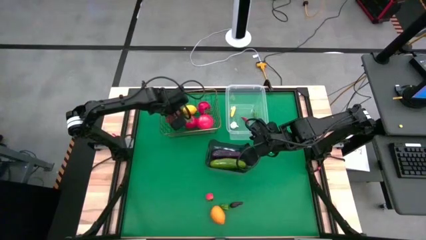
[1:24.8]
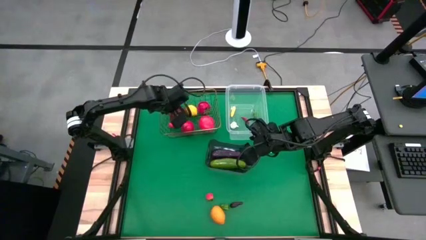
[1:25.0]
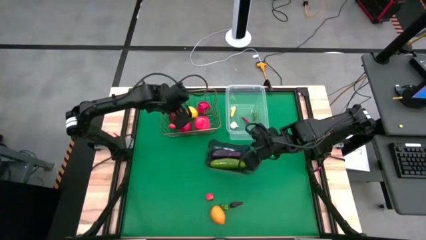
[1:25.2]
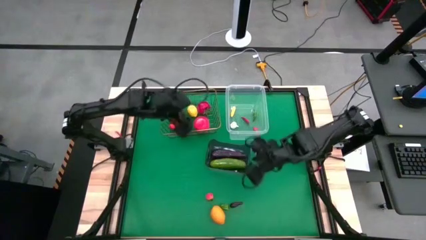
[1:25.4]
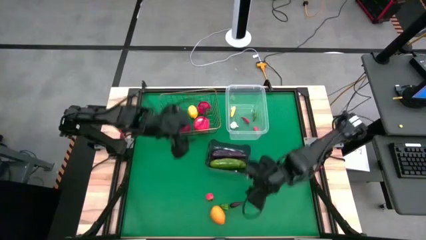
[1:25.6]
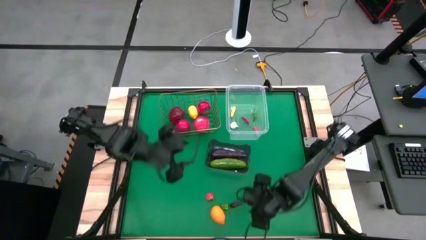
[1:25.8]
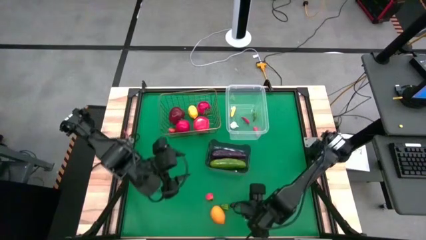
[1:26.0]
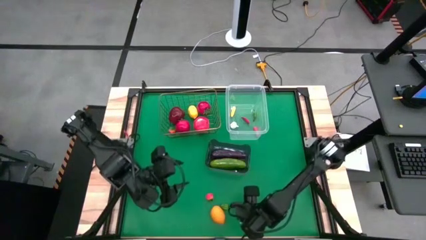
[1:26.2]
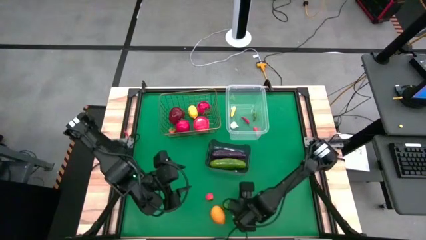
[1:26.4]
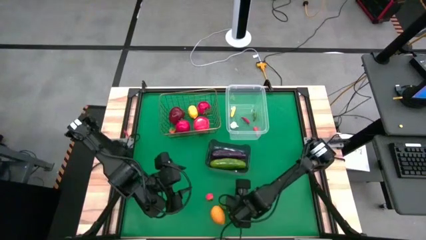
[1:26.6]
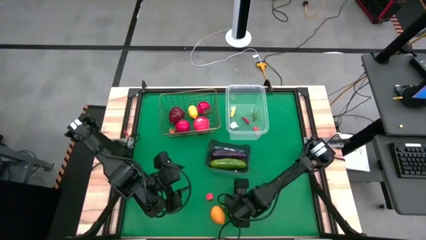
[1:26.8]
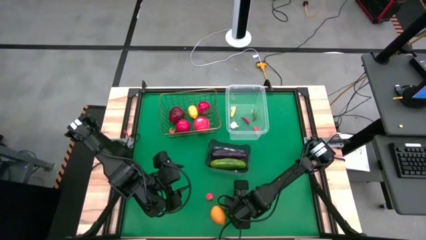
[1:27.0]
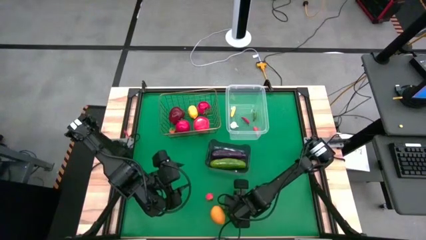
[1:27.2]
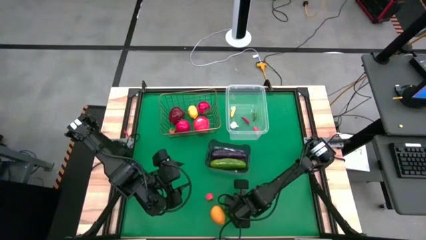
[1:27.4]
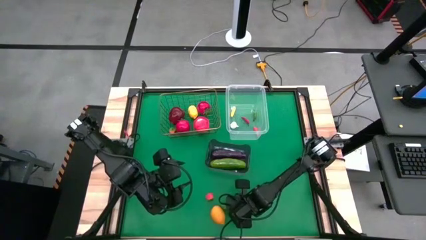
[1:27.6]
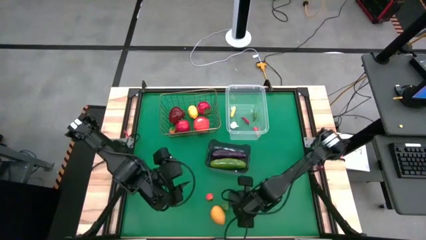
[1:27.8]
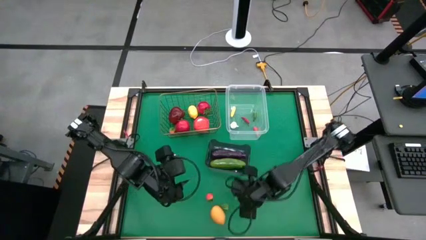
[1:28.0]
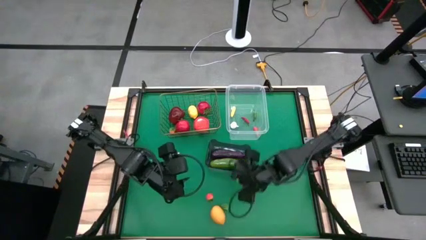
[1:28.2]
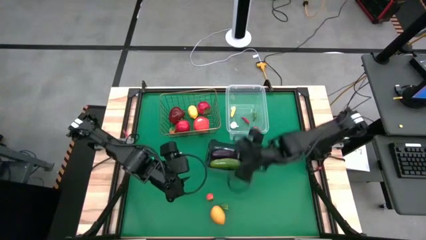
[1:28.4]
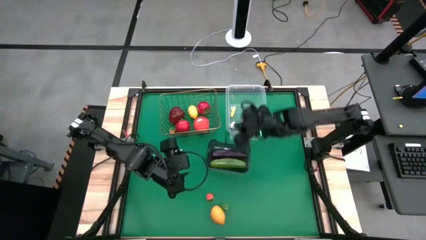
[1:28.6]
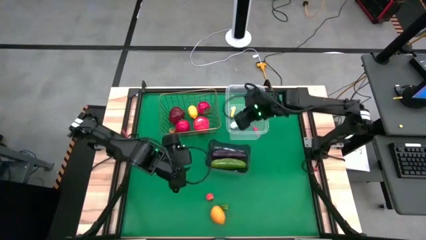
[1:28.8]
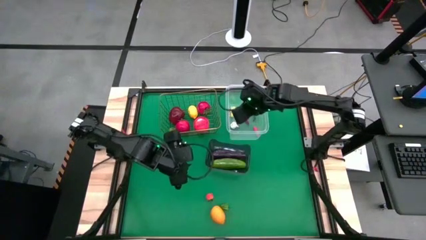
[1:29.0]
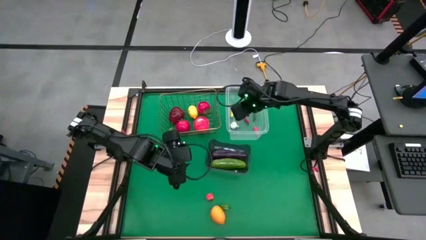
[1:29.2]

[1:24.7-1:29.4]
Task: Sort produce into baskets
Put the eggplant into the transparent bin

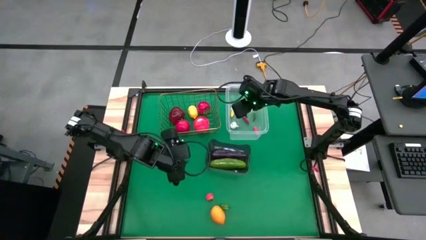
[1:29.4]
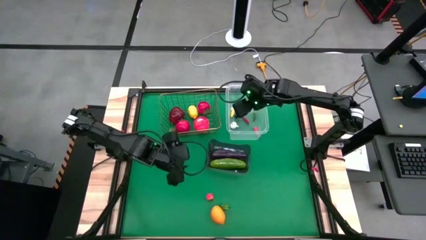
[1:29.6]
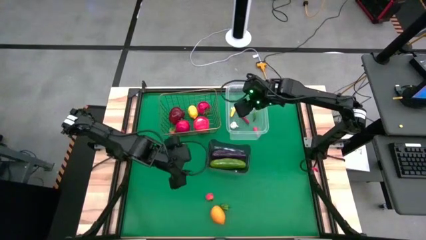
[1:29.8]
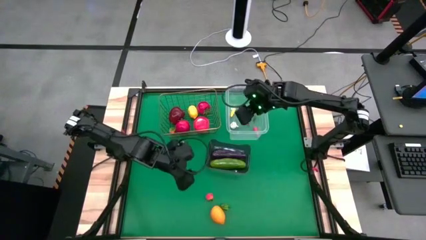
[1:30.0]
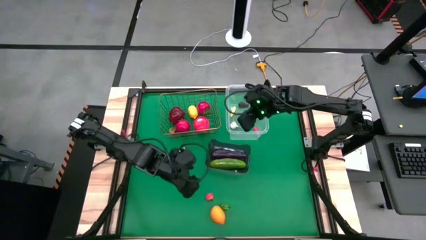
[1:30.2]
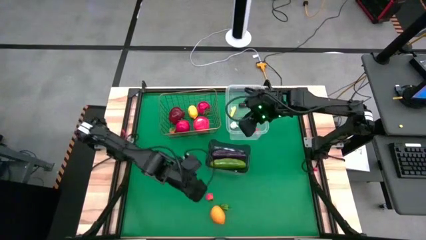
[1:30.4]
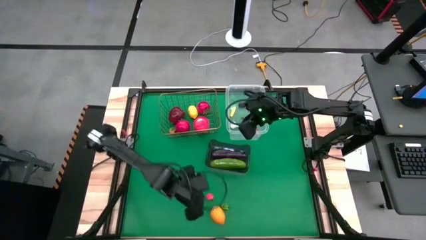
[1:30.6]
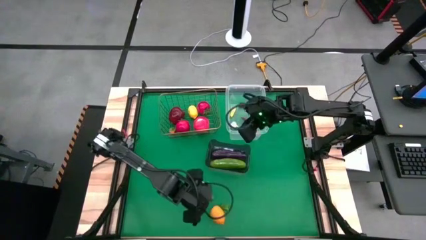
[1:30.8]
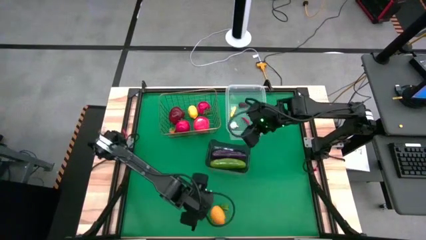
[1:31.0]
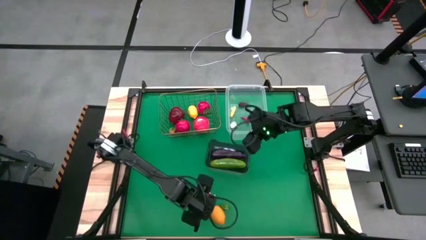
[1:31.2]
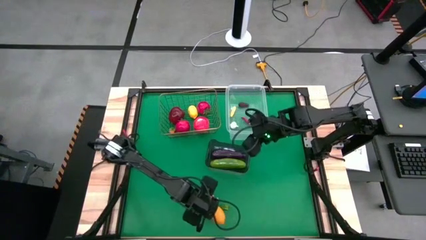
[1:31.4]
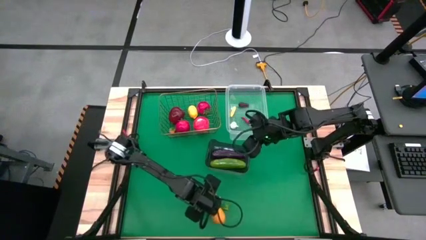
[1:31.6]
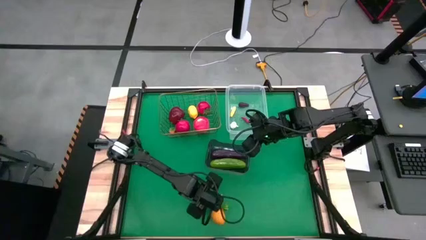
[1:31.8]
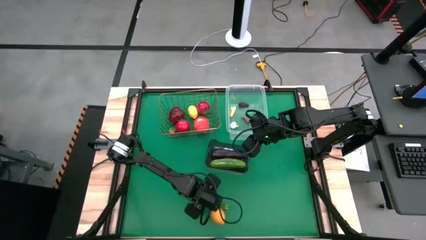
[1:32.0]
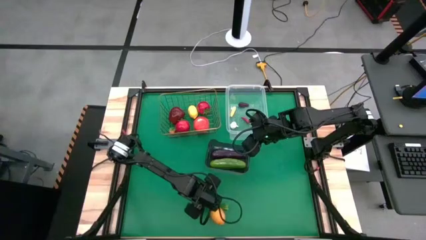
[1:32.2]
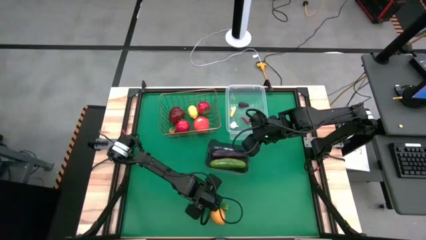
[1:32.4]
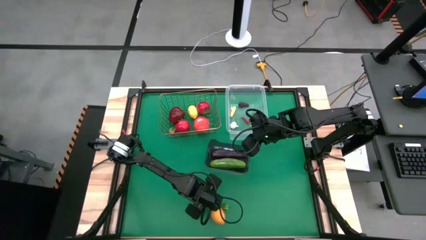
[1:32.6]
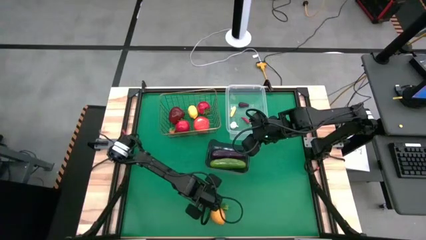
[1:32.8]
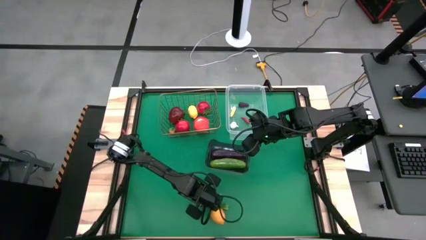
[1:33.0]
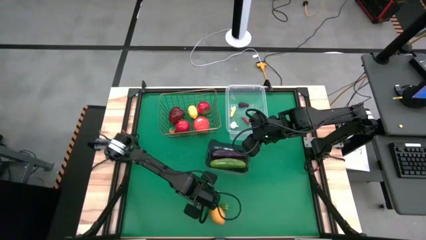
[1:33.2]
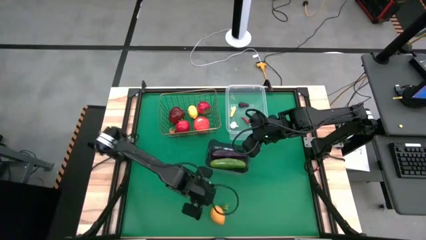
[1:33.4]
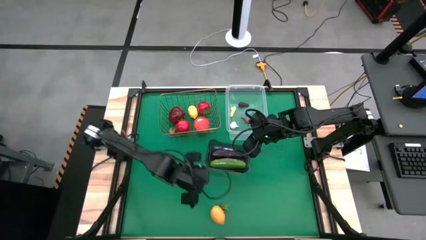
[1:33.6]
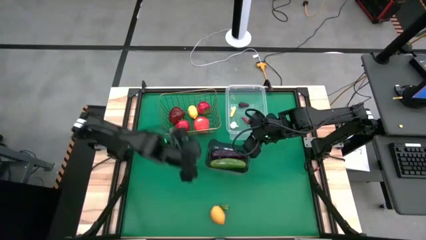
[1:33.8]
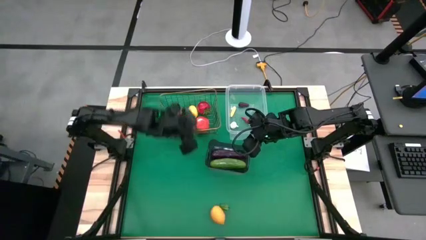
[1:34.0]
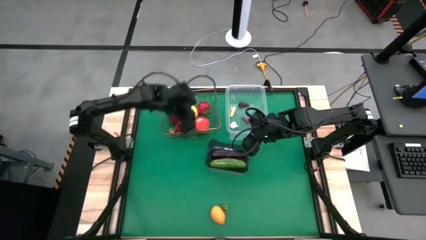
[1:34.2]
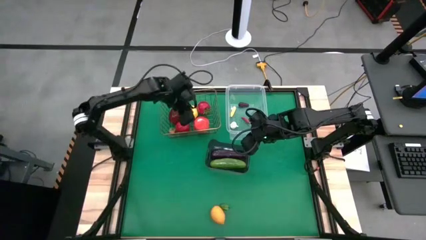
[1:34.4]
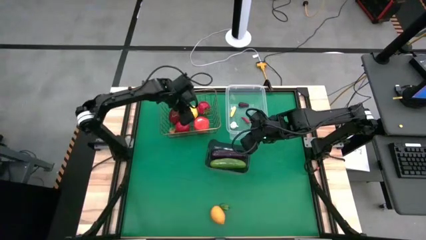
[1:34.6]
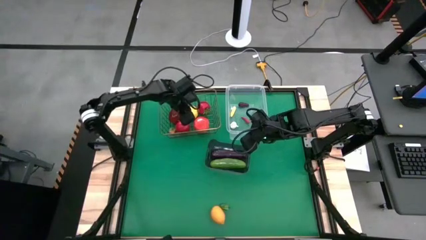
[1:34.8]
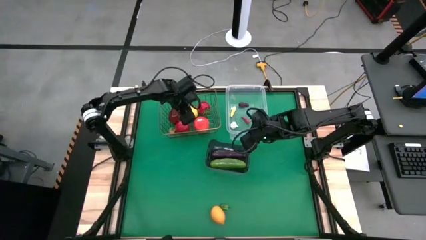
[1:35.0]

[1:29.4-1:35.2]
Put the tomato into the wire basket

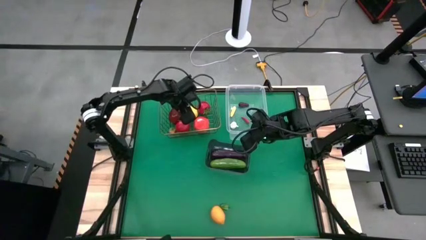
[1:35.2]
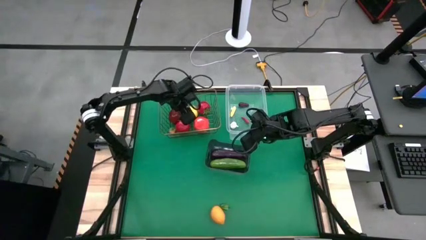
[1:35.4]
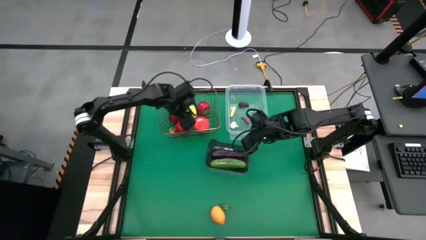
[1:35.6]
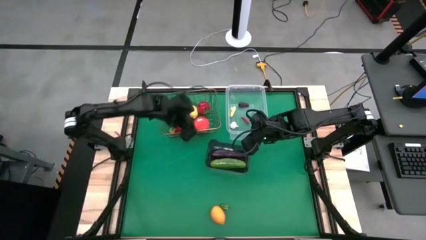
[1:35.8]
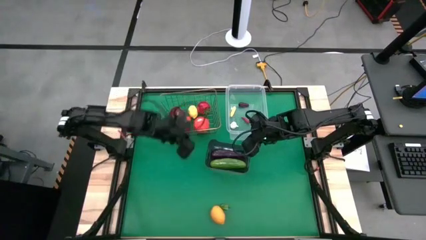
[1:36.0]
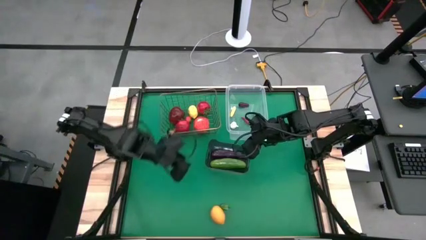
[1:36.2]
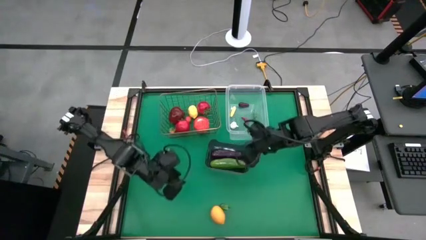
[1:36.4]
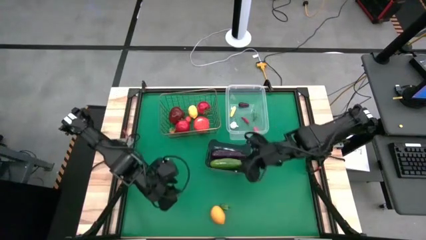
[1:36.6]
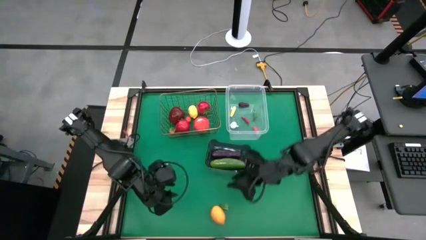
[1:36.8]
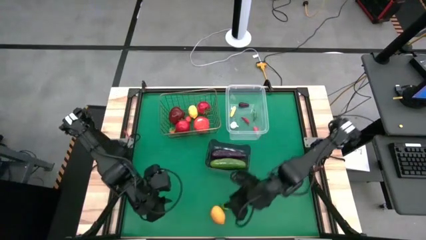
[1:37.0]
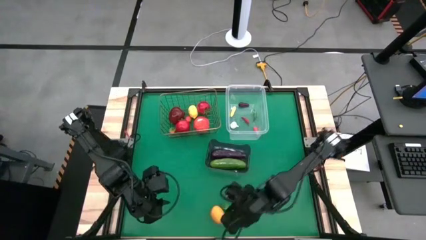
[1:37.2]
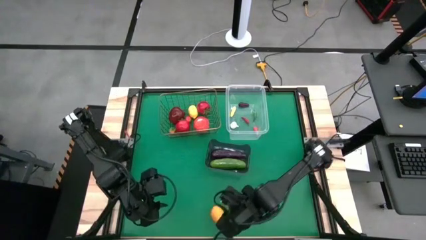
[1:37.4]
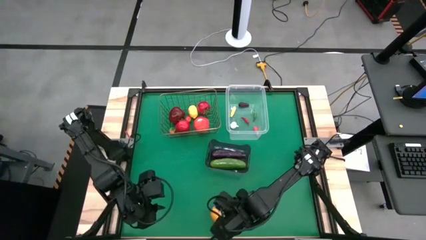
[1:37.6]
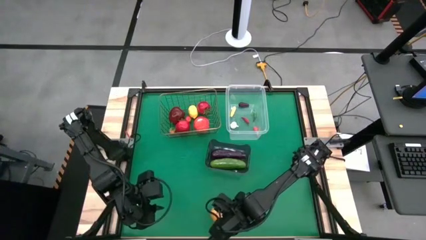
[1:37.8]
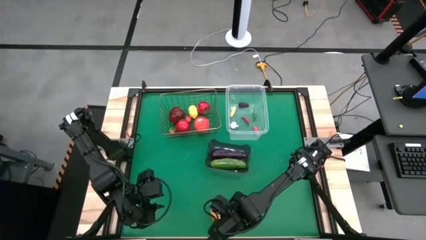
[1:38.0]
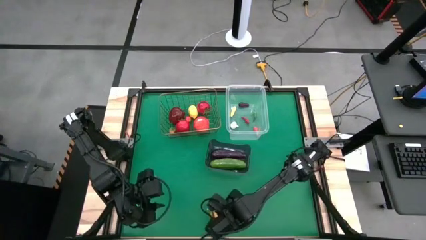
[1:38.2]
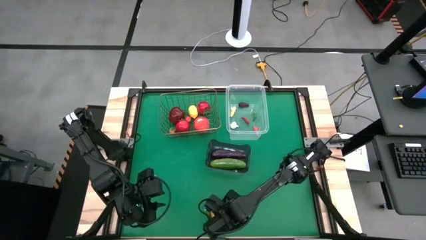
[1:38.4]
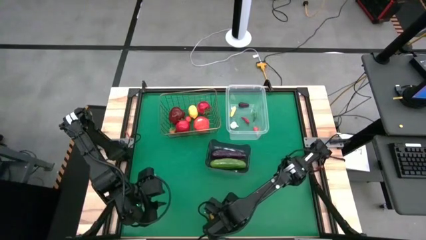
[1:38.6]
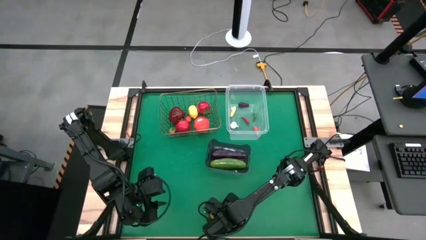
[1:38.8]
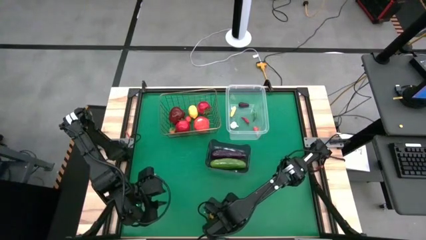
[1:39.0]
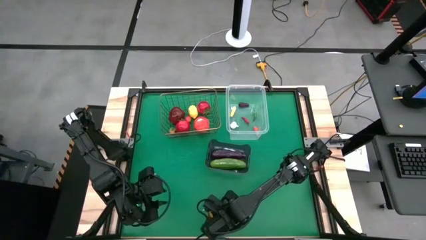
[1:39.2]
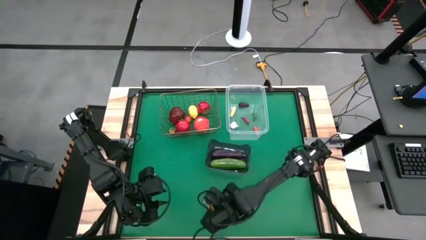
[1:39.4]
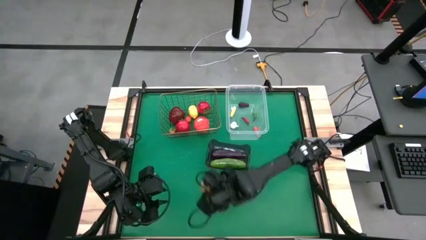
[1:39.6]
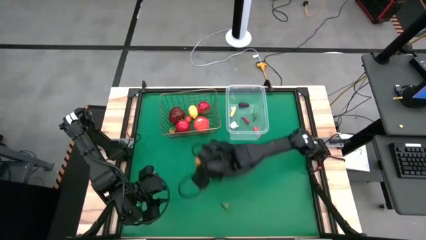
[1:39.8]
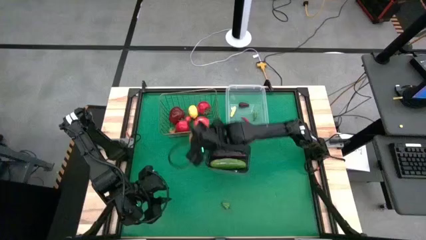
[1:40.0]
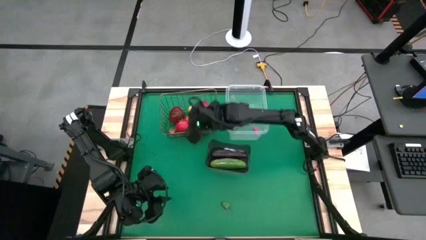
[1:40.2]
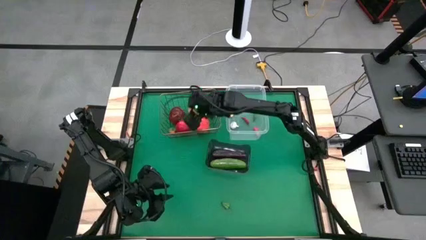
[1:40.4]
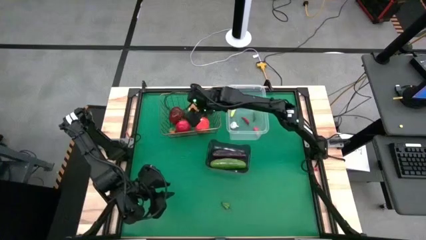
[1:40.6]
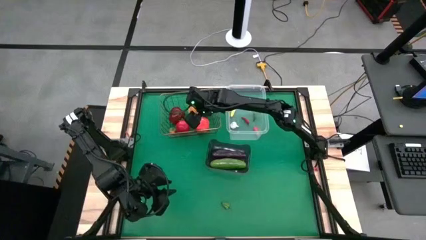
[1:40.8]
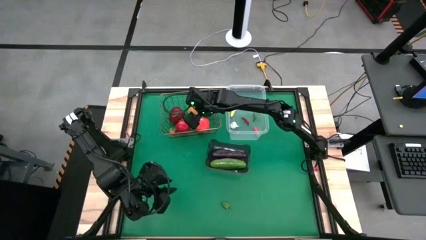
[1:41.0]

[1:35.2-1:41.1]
Put the lemon into the wire basket
